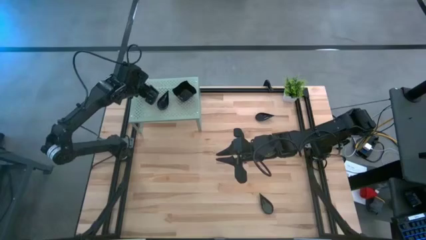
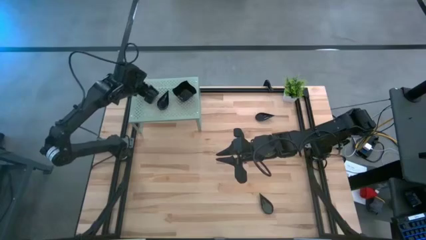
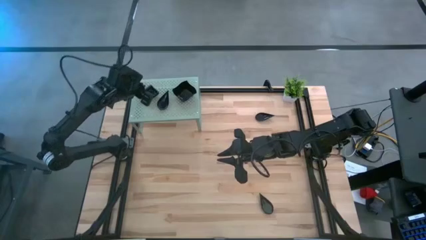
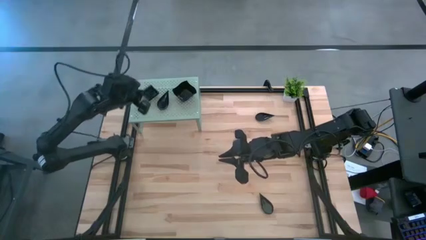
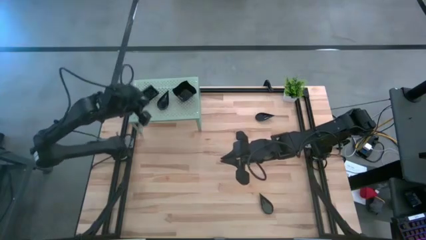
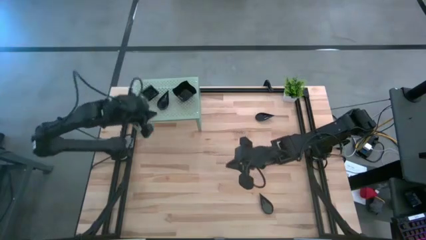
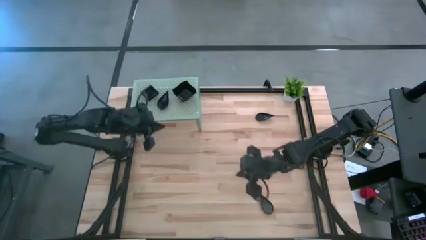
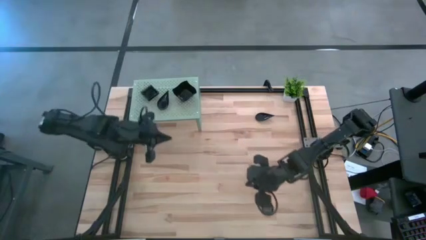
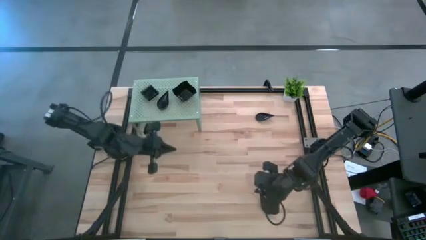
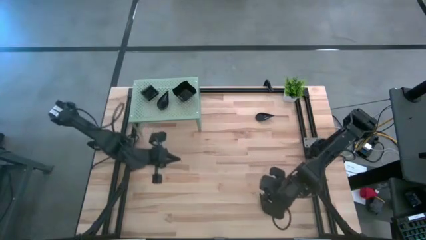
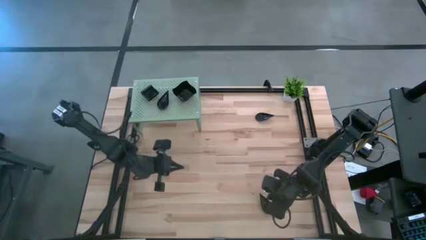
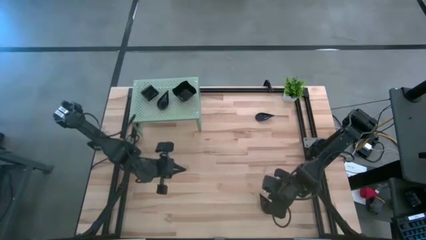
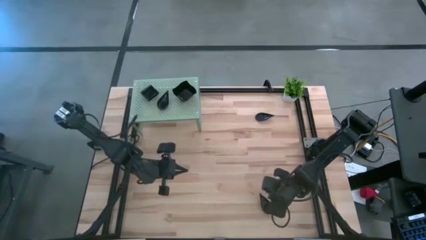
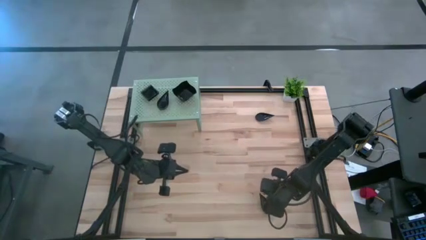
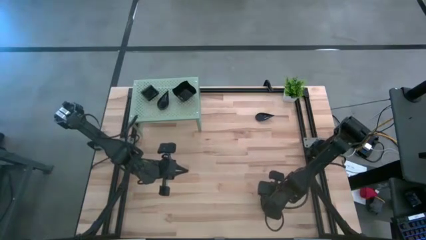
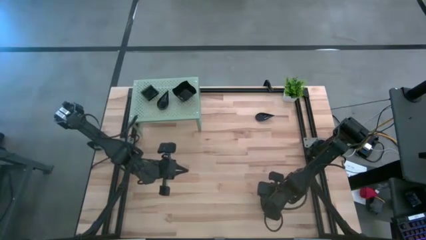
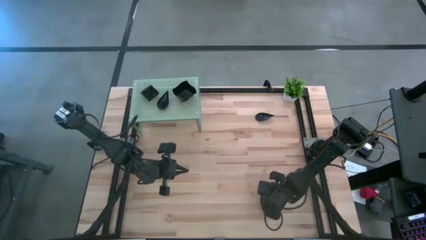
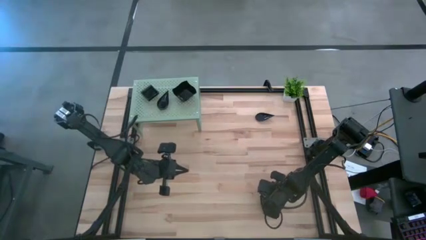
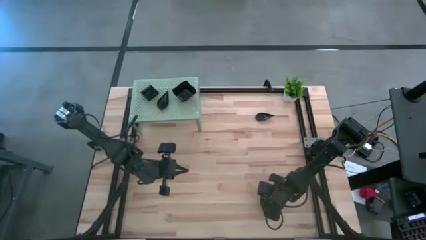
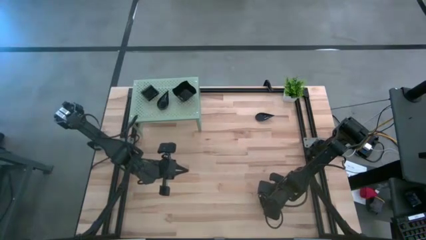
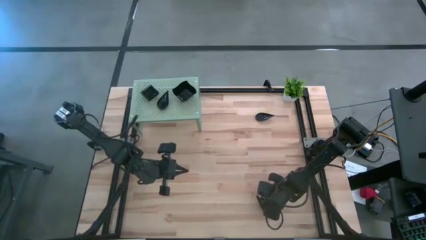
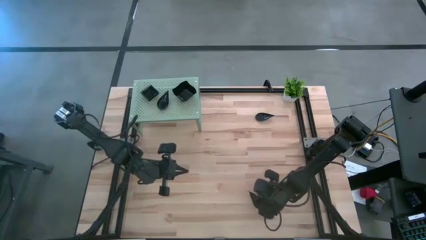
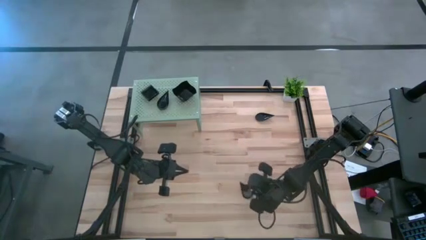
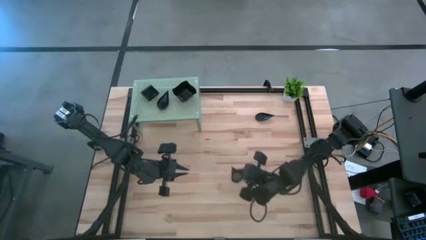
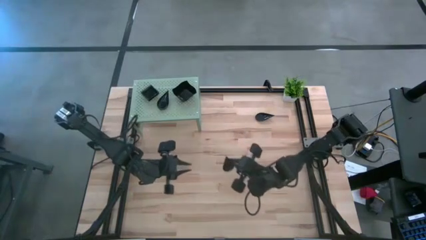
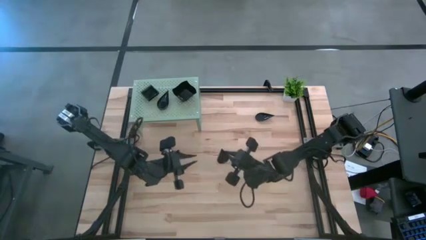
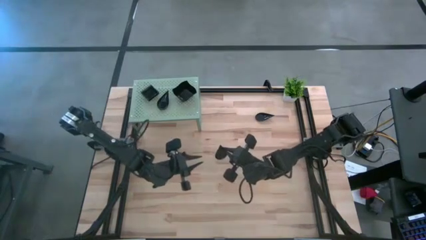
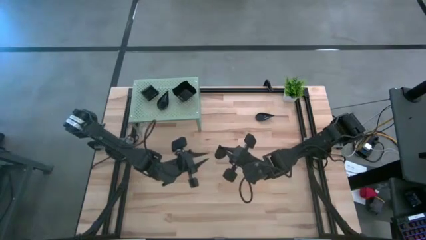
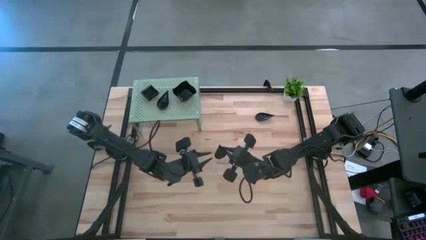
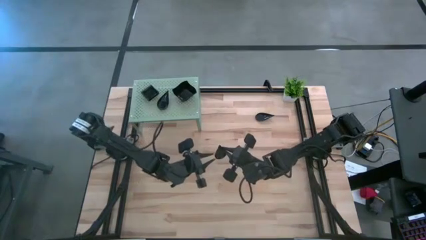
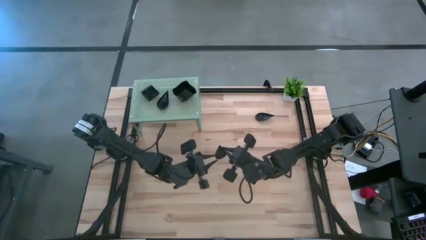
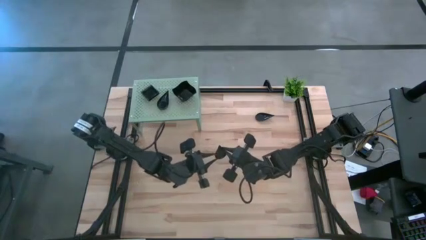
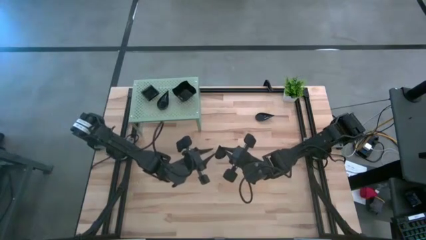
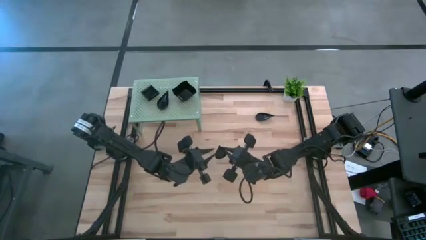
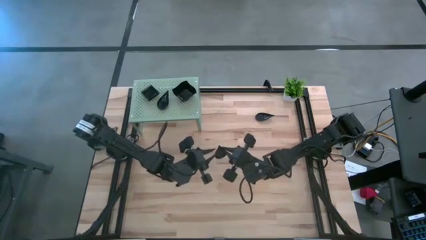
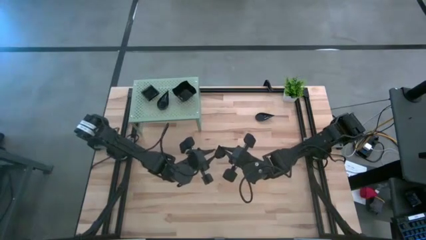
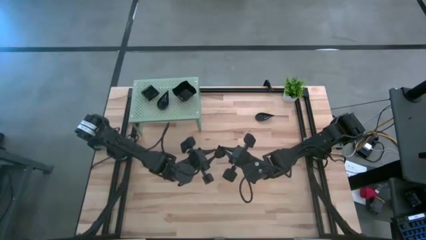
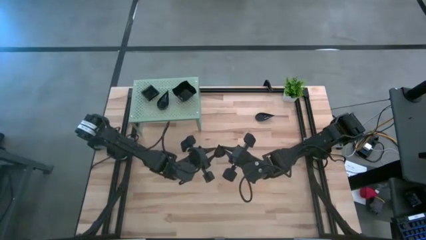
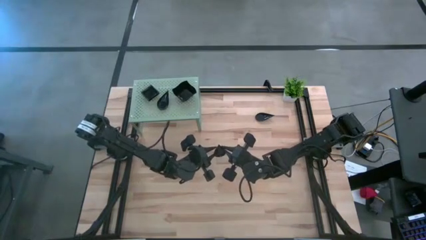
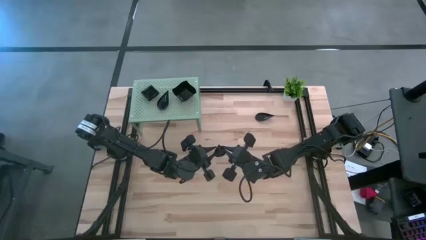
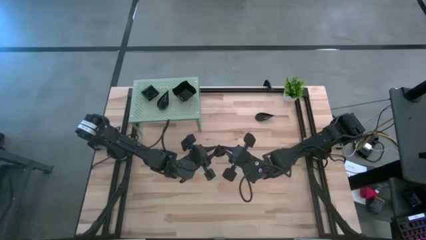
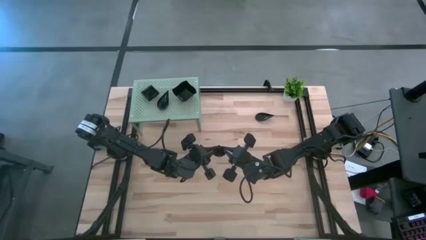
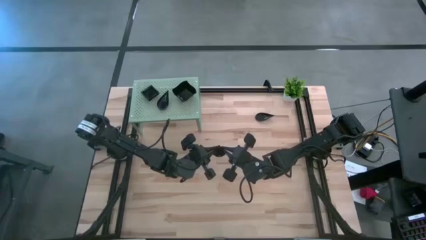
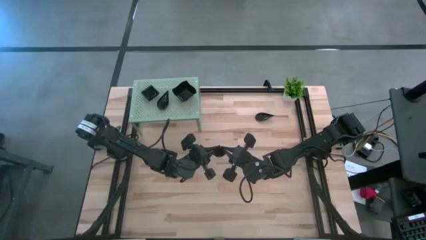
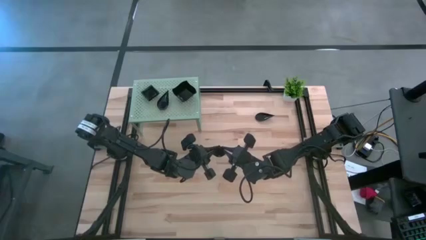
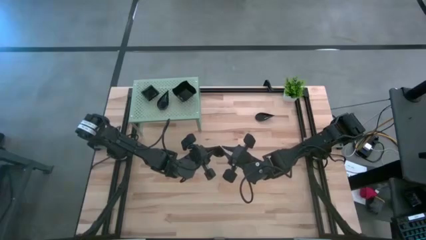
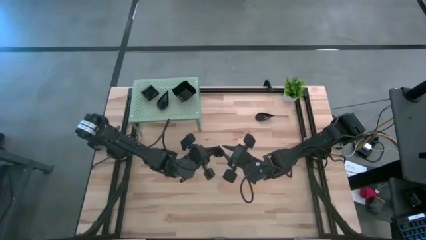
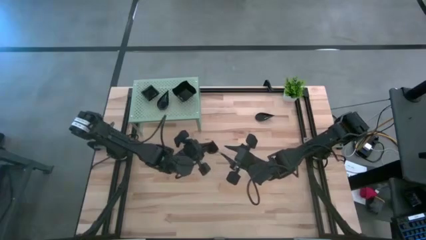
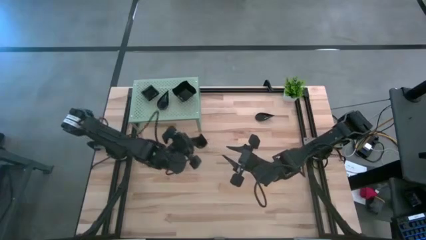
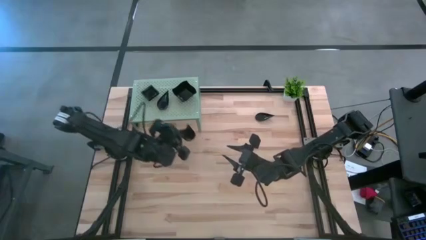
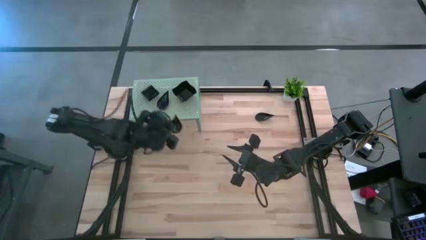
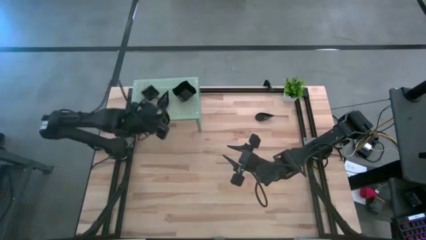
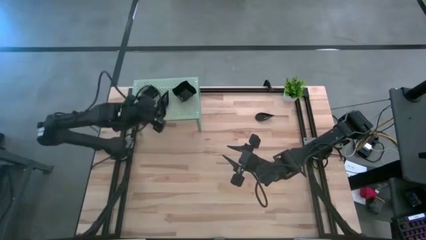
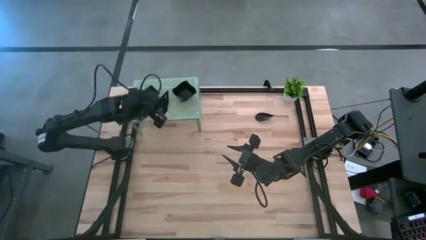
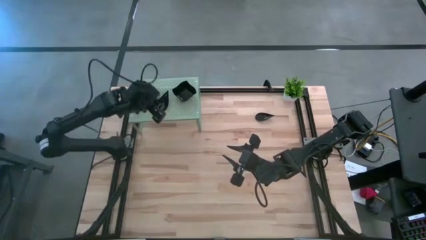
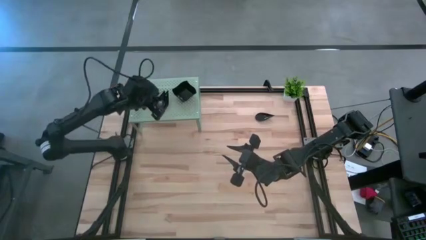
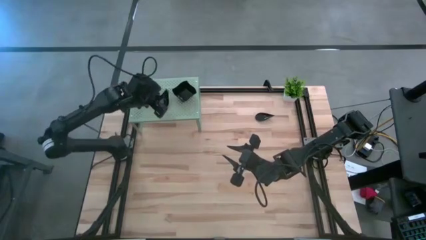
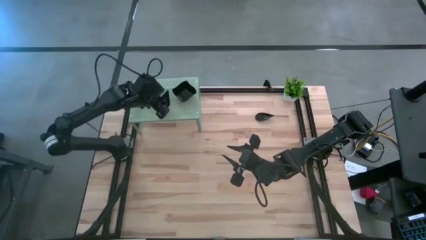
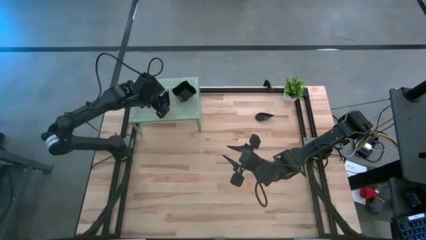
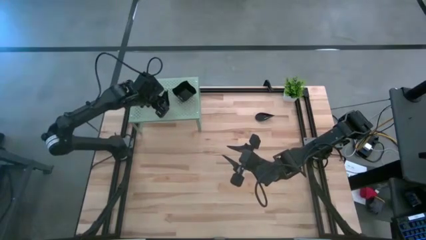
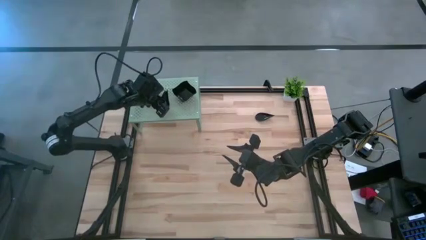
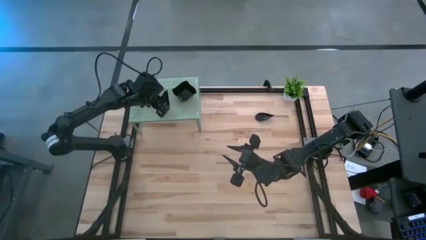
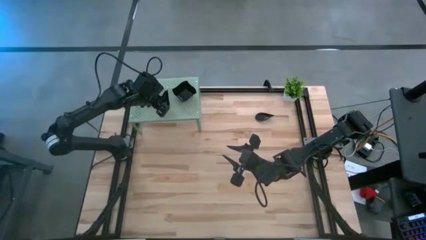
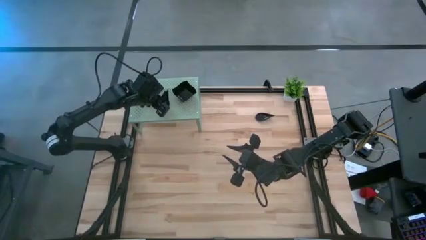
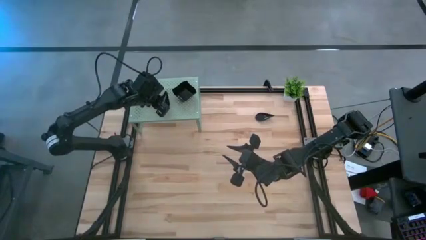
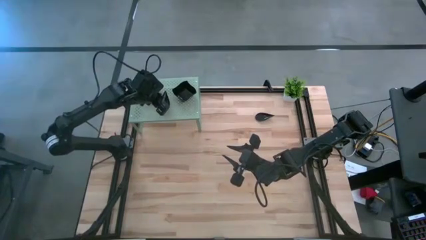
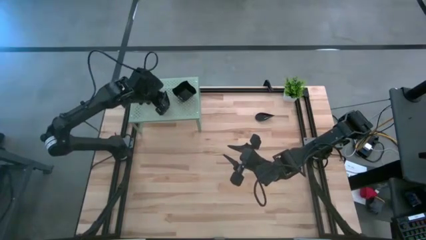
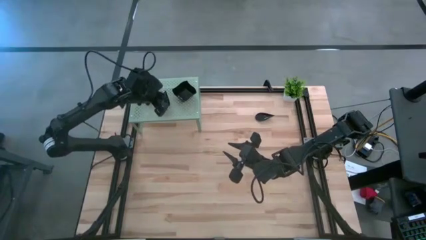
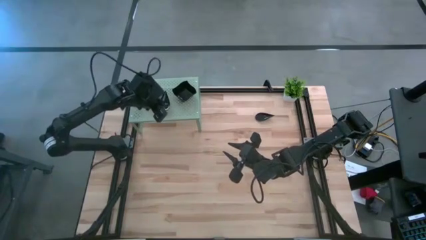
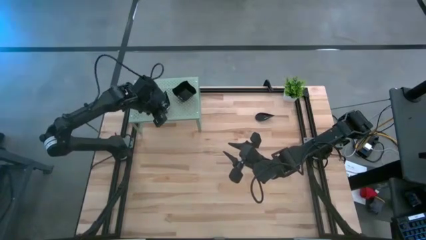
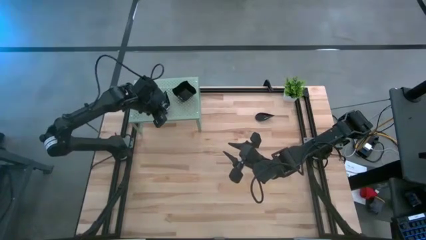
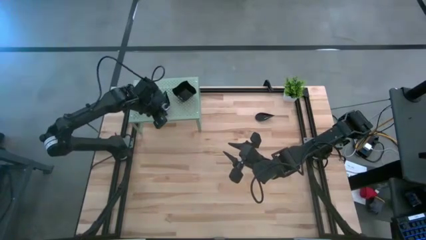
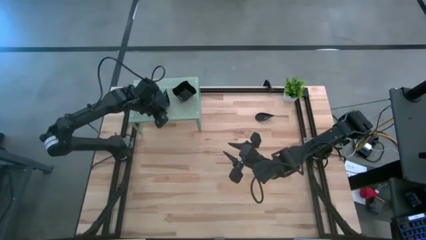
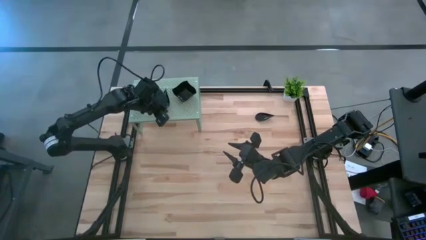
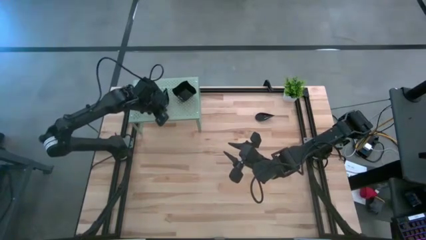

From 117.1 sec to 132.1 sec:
Task: Pick & Place Mini shaped plates
Stack the black drop-shaped plate on top of the black drop-shaped plate on the shelf
